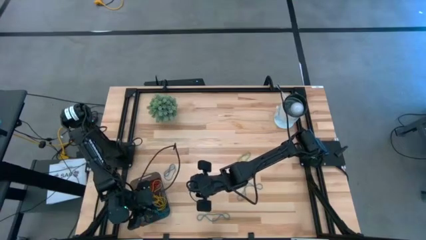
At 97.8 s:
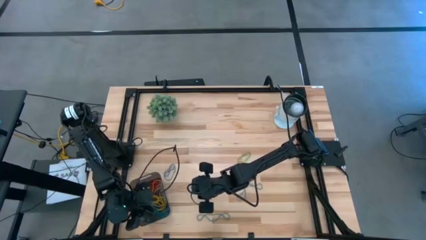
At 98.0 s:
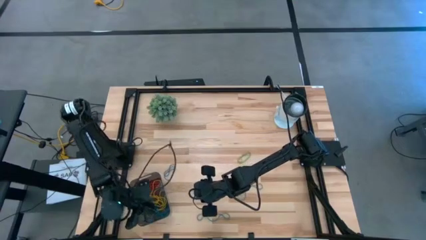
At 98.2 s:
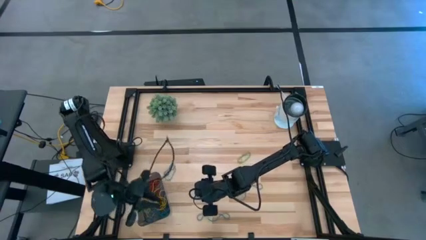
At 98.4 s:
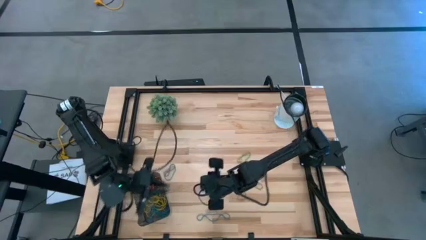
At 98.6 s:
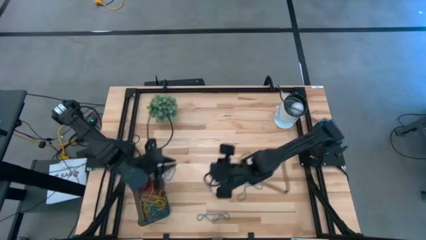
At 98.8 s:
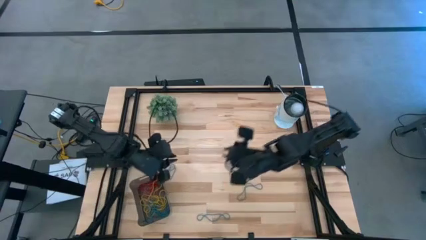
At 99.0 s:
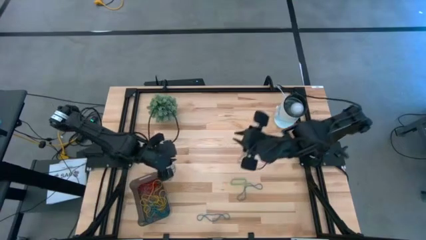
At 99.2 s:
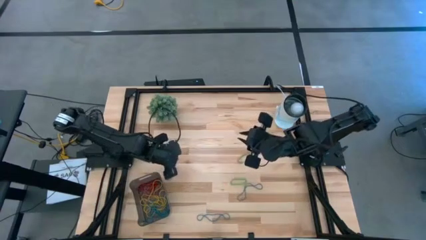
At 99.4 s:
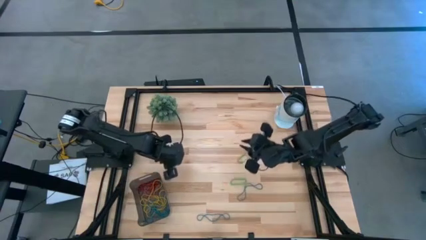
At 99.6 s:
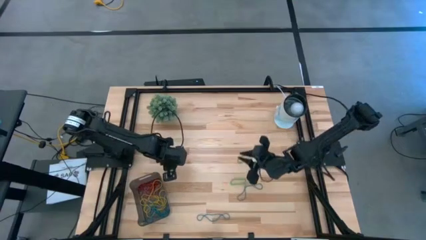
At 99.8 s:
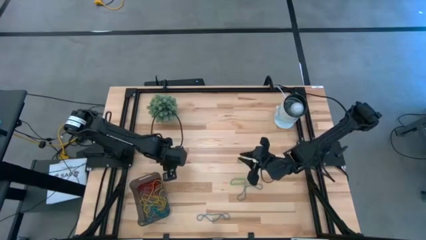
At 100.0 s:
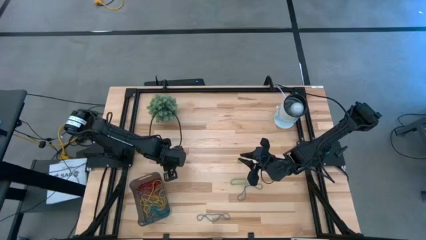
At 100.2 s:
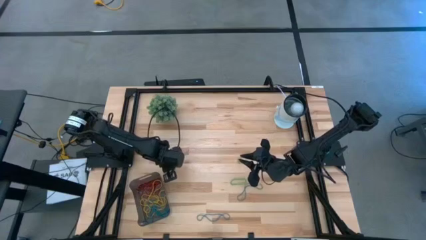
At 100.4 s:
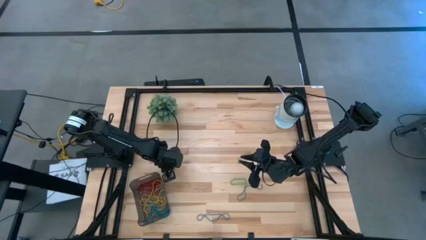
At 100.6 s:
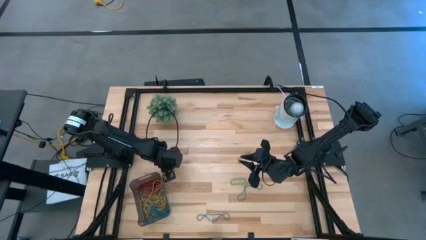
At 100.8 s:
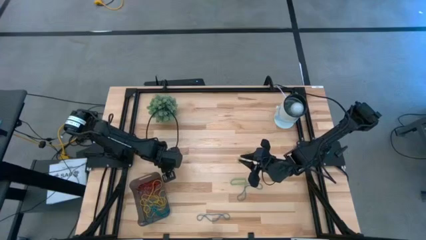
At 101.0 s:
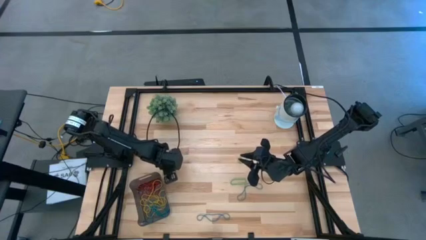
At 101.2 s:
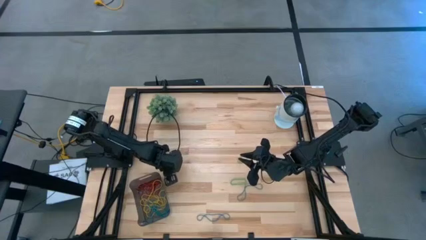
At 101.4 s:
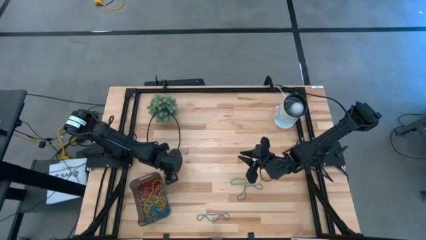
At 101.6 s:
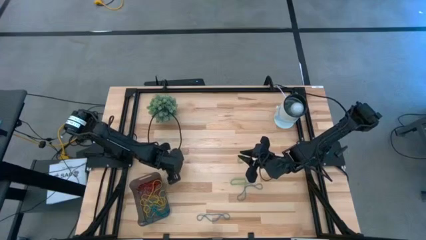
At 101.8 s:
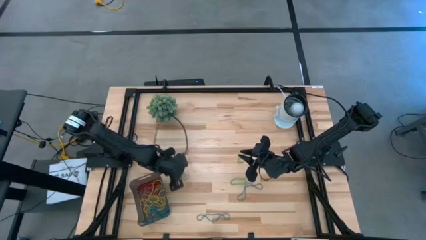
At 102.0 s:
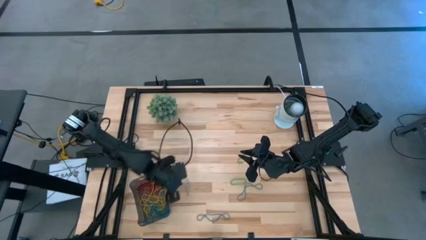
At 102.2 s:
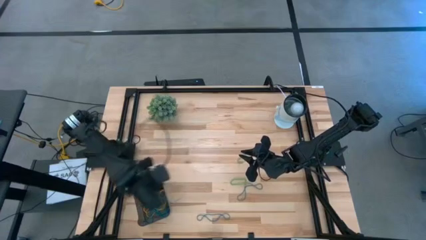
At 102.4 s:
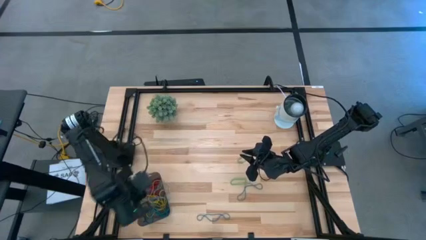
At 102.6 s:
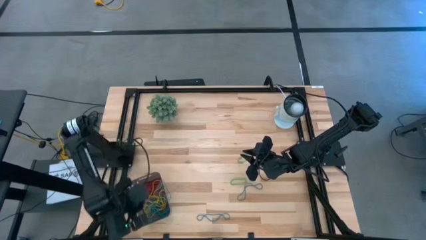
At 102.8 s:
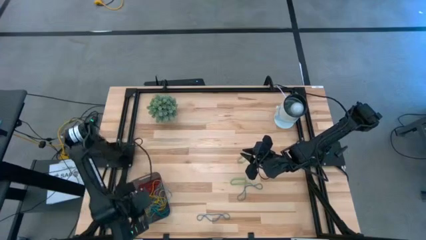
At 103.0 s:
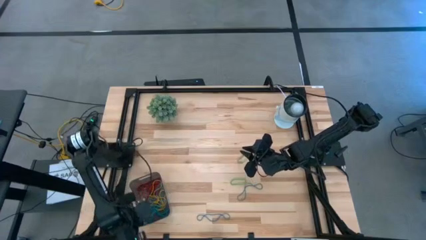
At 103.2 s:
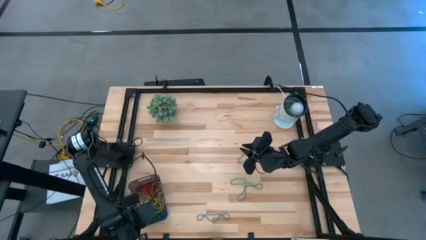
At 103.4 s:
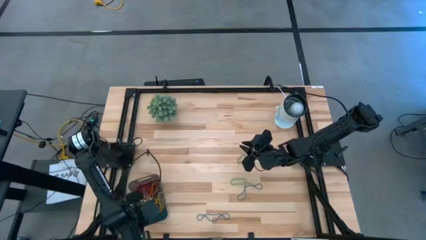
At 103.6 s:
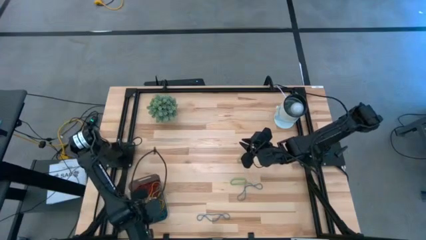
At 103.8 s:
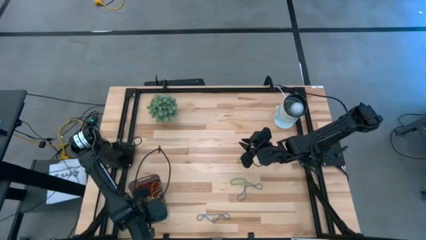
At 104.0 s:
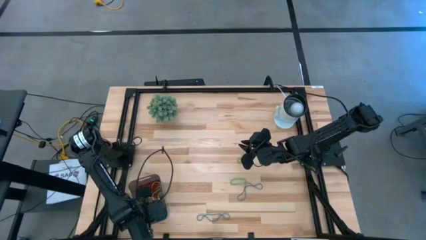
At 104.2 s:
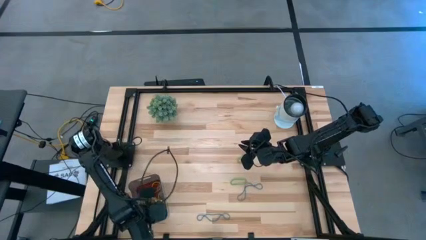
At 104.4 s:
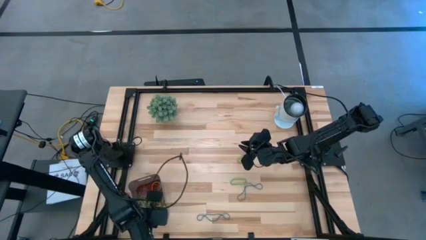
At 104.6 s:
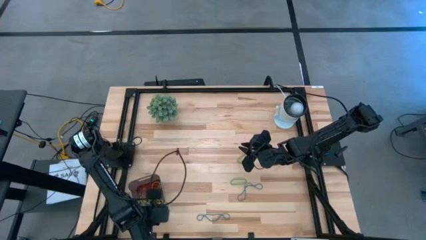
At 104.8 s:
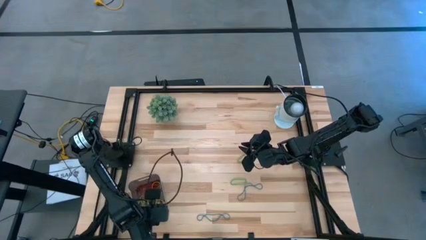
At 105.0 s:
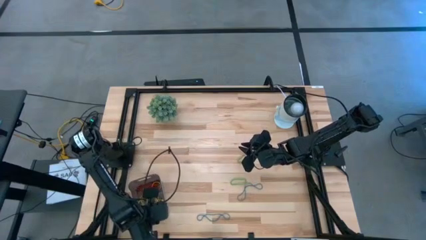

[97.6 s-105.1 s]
Task: Pick and place items into bin
Put the blue rubber band into the black bin

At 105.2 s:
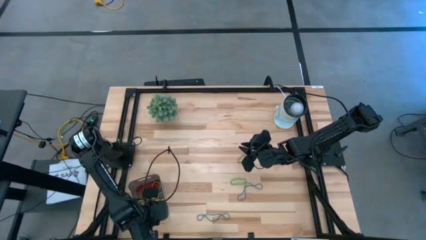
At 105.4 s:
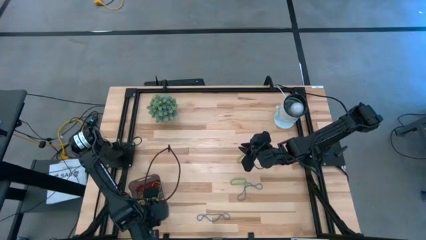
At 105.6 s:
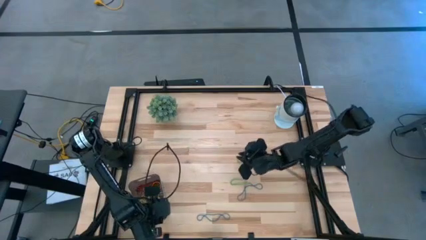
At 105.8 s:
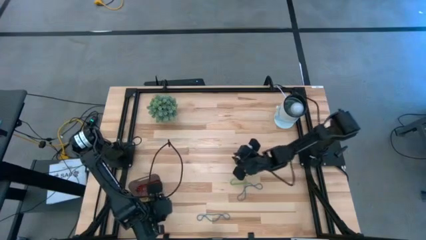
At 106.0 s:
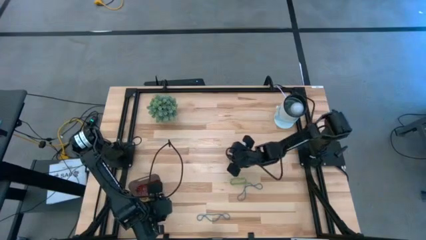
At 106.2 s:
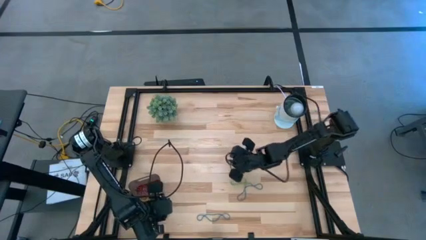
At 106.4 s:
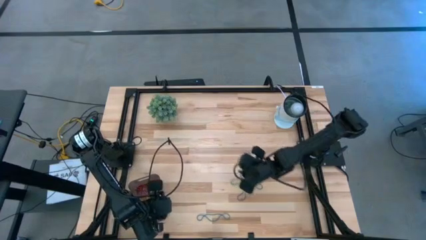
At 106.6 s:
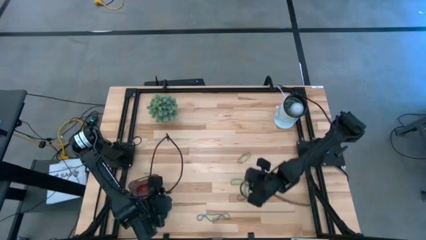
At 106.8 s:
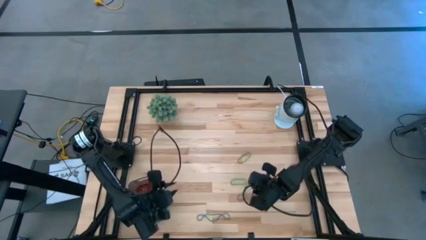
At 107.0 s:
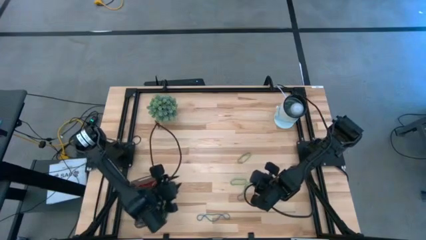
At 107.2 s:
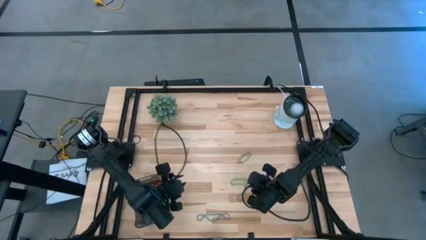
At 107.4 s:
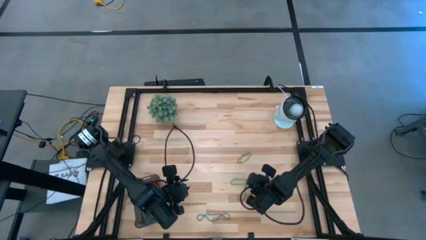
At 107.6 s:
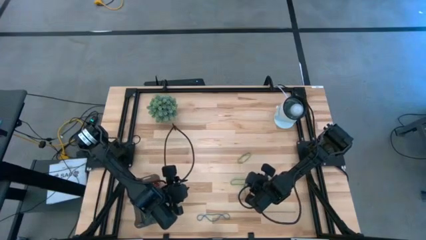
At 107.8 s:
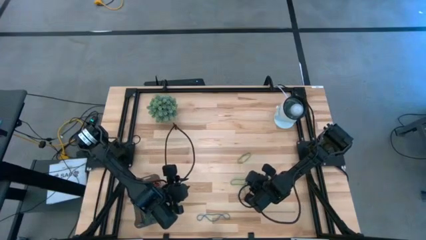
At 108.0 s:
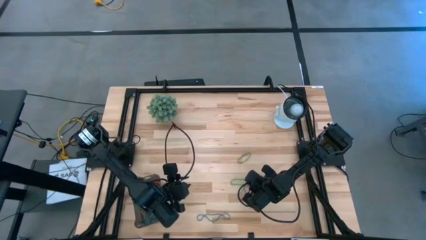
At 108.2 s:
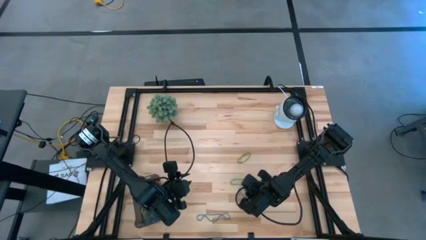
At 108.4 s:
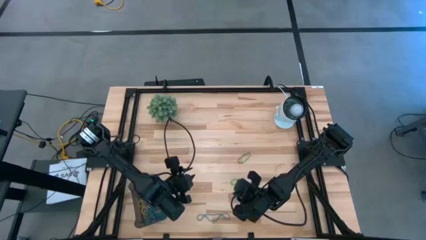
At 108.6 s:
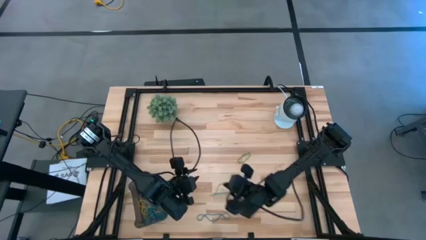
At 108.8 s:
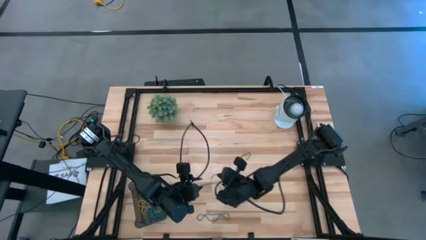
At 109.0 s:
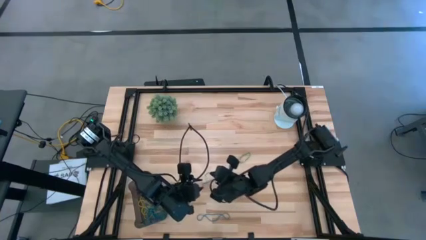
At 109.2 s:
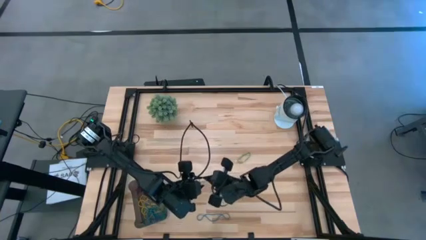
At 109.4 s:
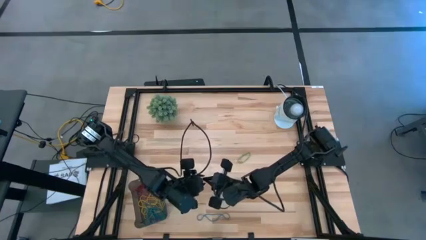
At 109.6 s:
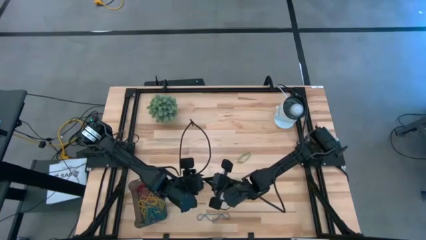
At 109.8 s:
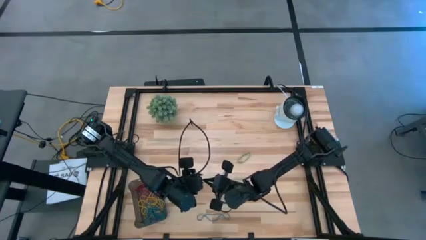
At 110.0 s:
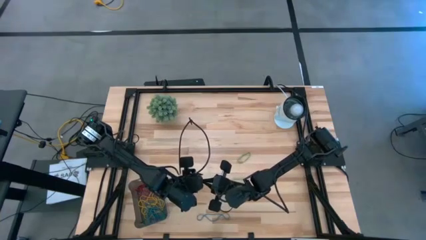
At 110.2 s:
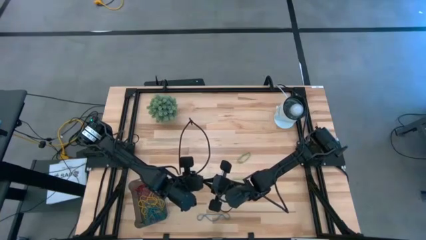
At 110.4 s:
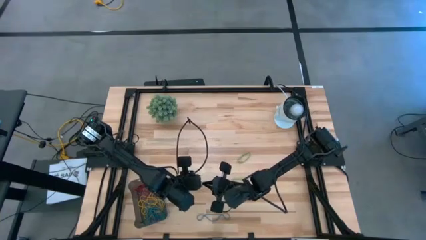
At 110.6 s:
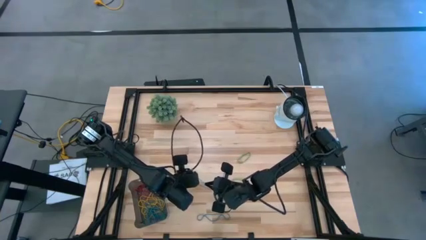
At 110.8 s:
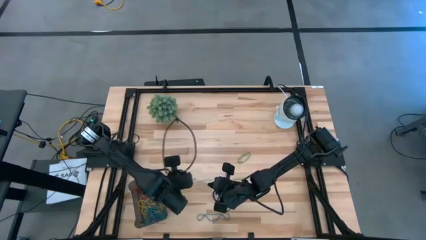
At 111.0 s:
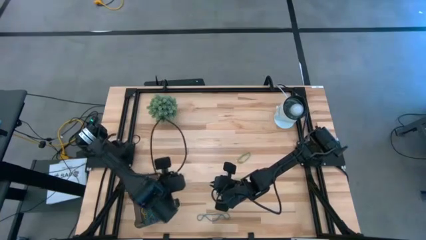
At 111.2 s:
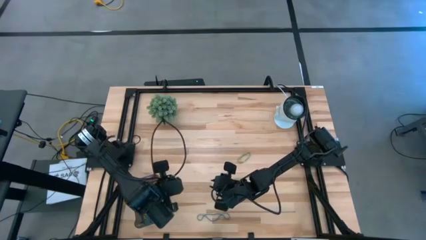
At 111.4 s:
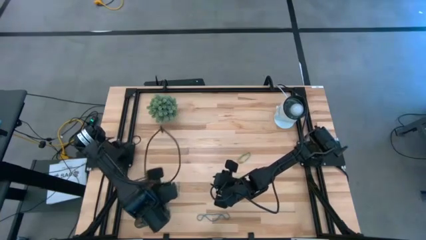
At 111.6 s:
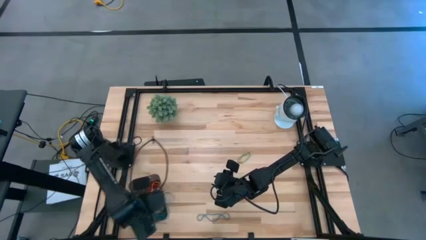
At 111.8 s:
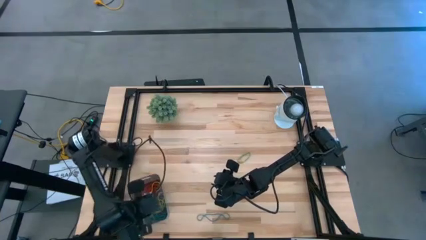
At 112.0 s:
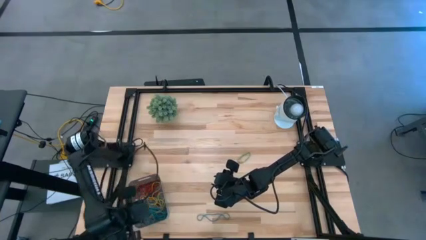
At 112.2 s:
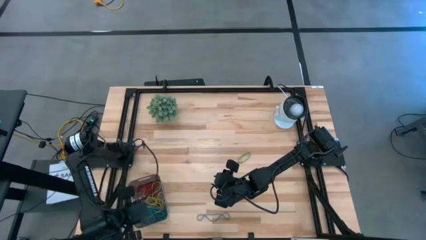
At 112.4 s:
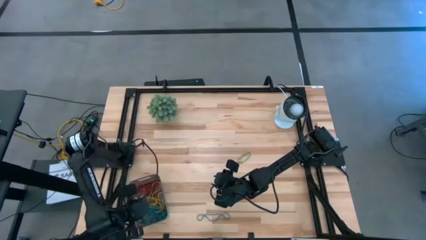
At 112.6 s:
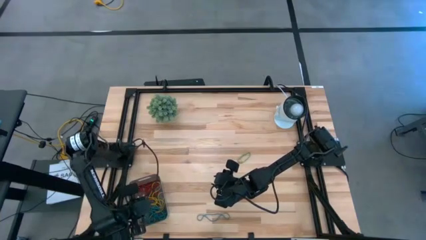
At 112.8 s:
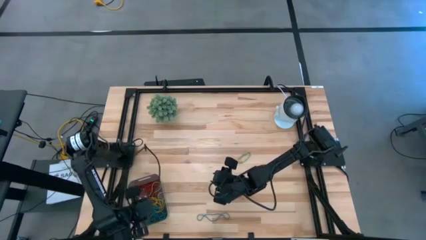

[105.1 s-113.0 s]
Put the blue rubber band into the black bin
